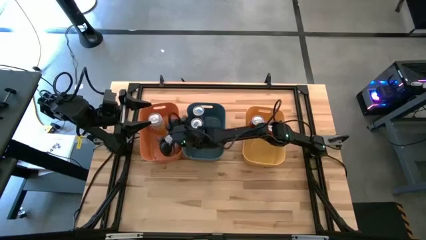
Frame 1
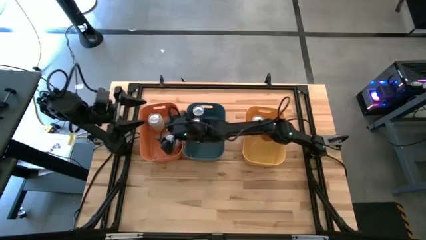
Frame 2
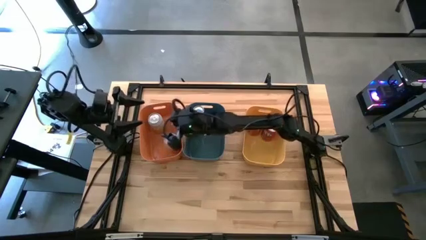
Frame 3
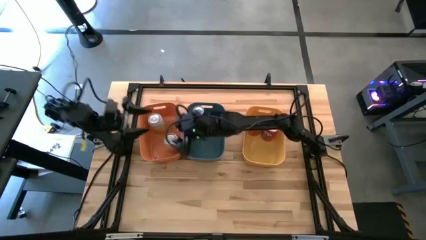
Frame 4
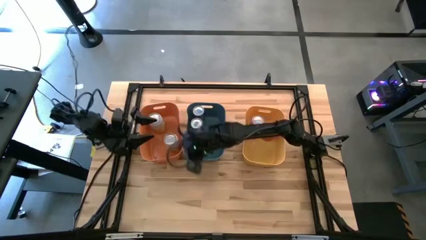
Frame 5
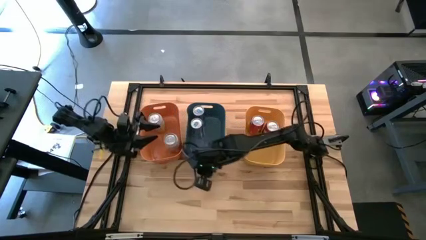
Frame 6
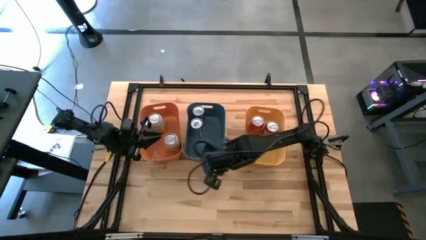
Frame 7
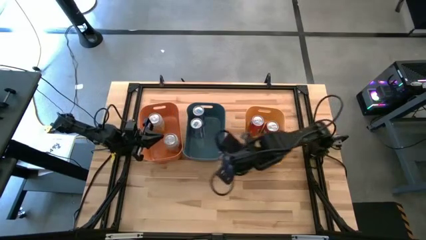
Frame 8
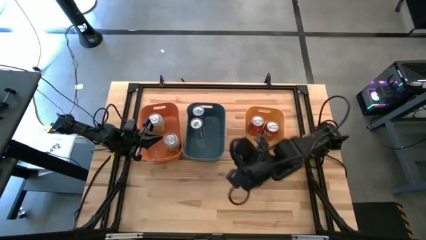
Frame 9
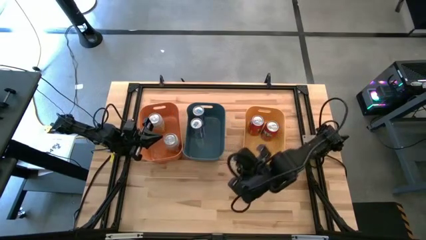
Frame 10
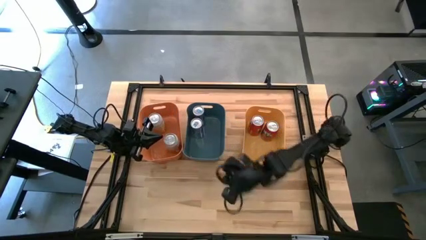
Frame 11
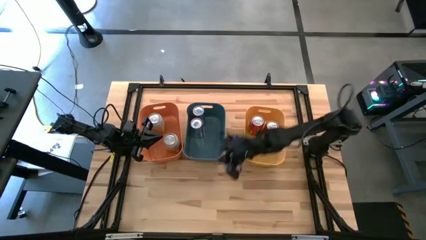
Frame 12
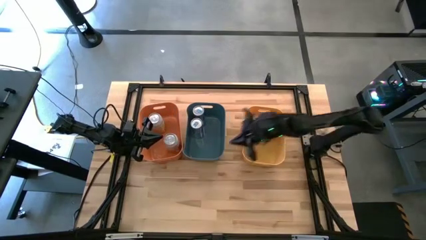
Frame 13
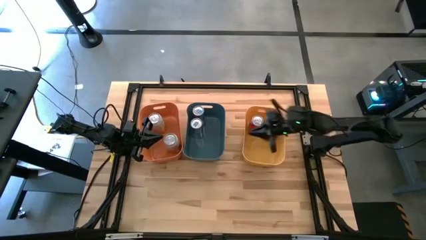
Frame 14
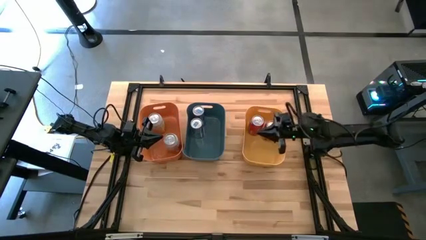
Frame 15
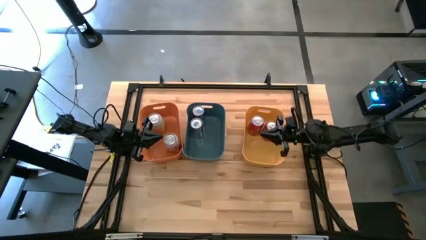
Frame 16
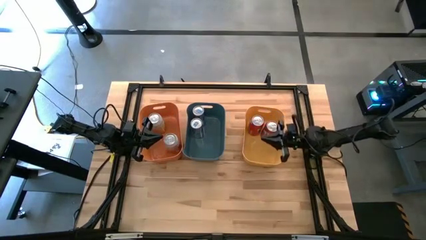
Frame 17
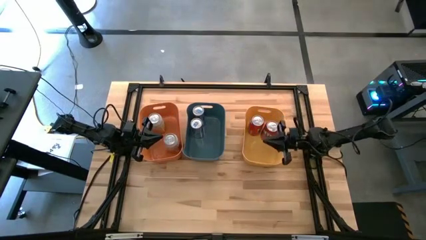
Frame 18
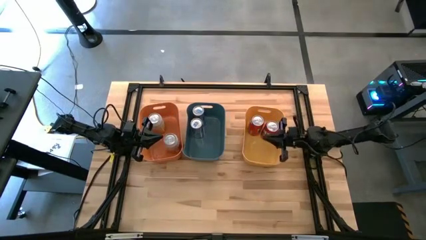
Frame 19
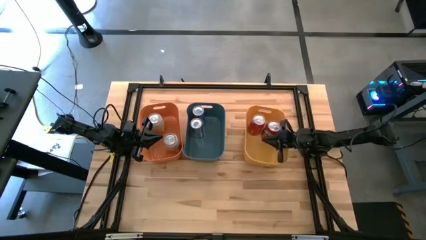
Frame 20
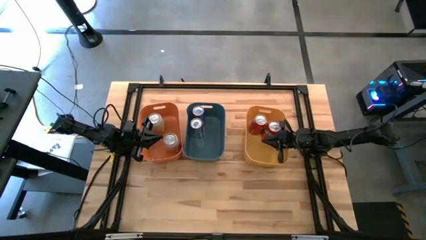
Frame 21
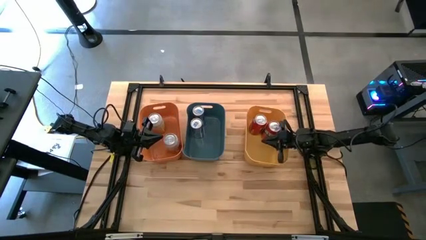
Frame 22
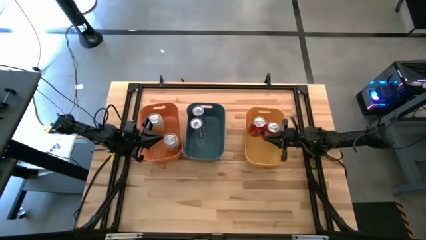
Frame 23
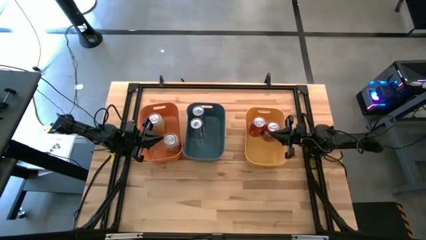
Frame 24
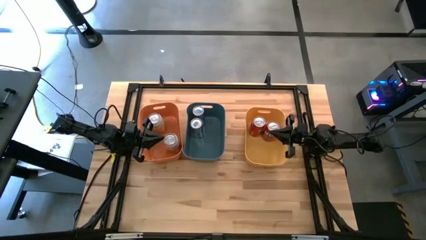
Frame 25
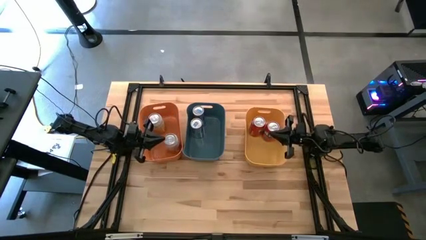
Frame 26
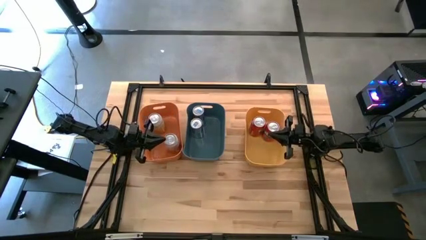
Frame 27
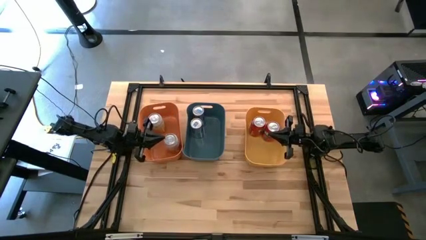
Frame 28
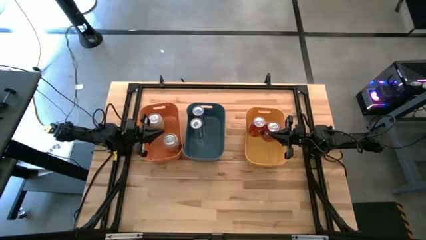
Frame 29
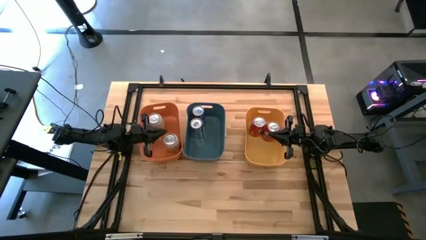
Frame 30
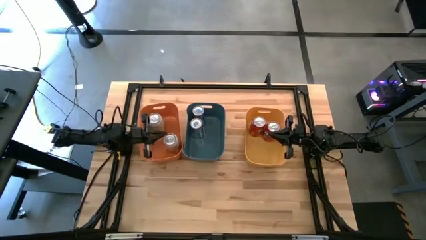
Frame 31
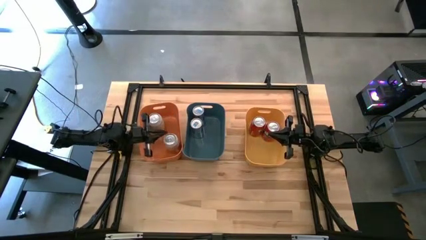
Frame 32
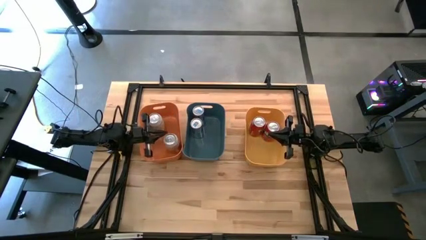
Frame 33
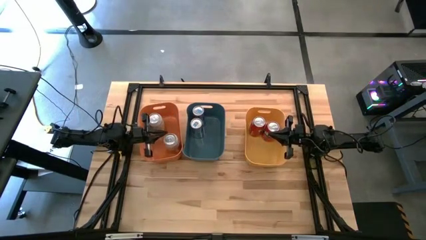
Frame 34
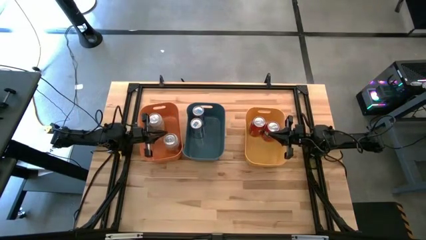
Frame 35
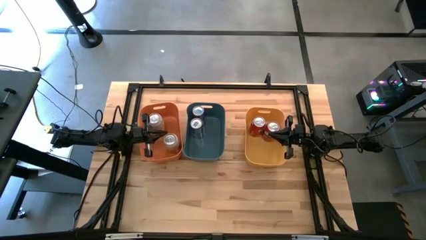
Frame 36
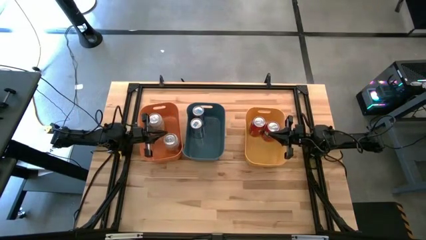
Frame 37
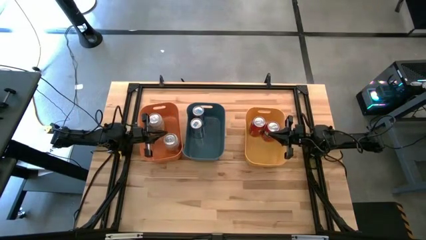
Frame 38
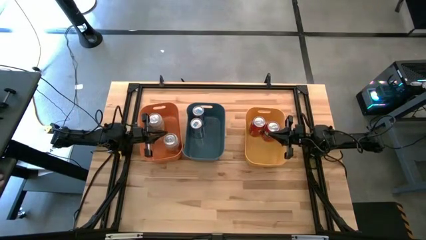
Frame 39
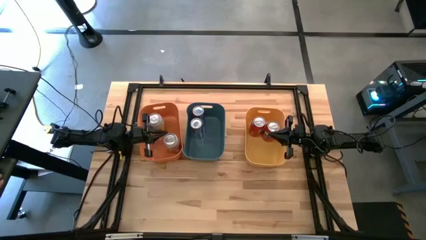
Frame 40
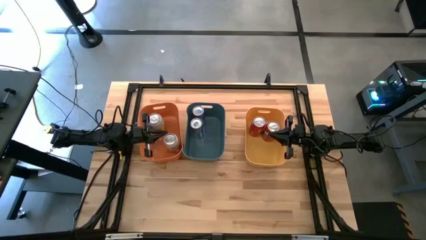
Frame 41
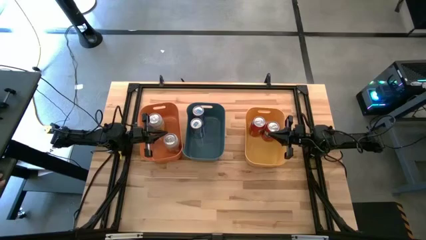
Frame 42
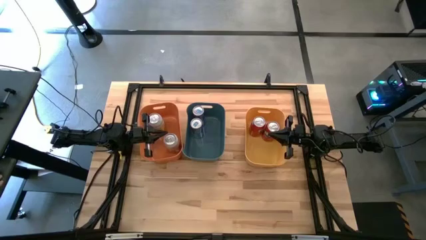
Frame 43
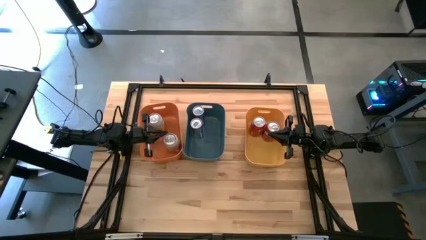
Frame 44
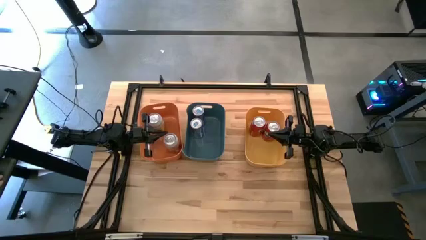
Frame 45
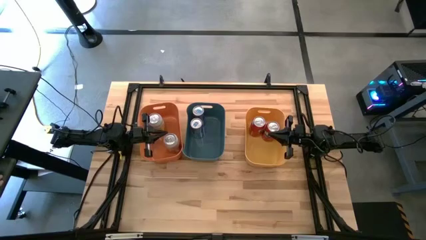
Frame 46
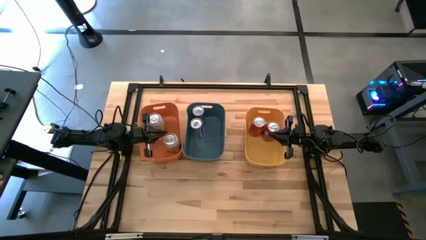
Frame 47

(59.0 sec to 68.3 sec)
Task: Sort soda cans
Return to Home Position

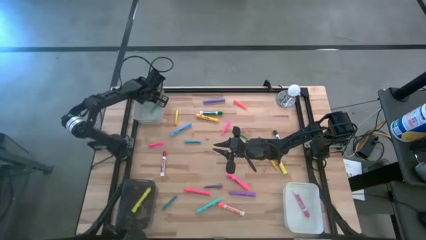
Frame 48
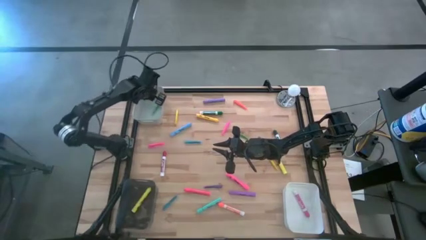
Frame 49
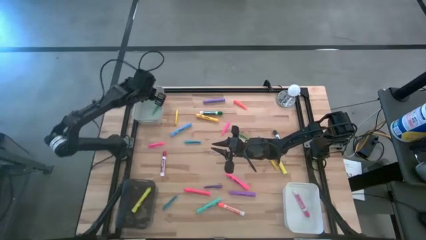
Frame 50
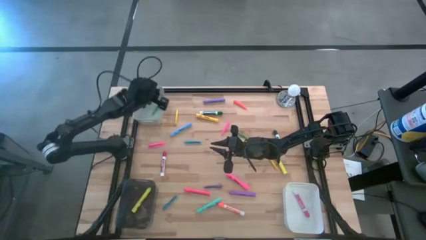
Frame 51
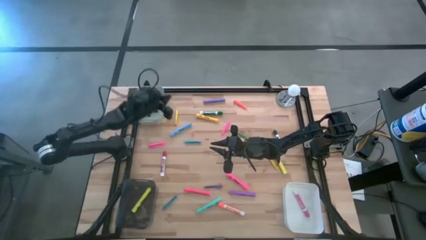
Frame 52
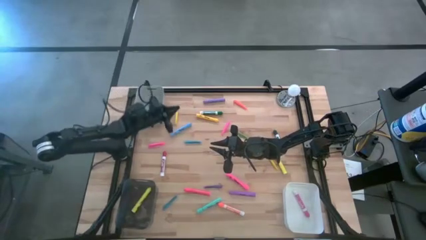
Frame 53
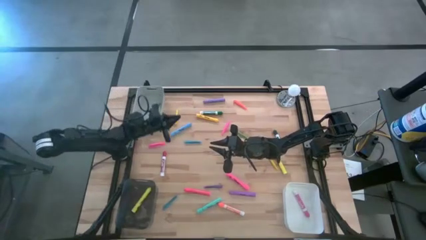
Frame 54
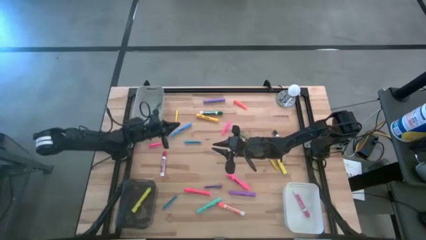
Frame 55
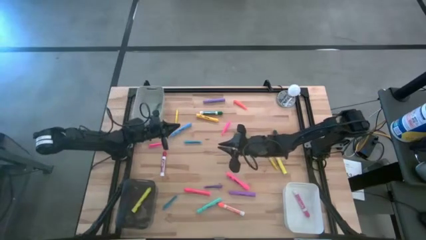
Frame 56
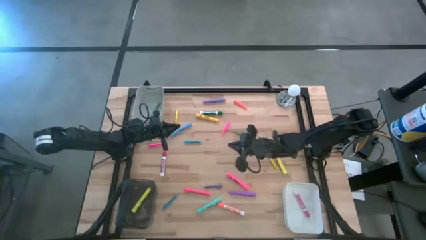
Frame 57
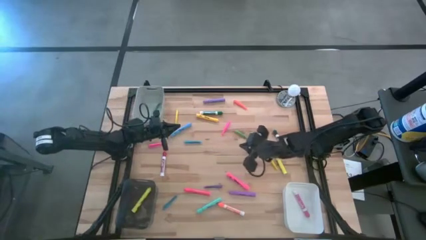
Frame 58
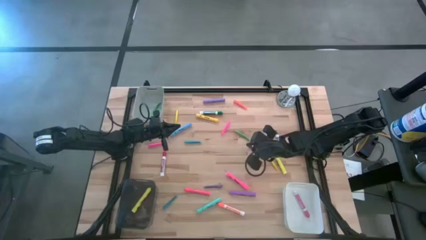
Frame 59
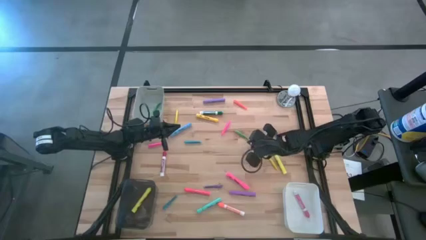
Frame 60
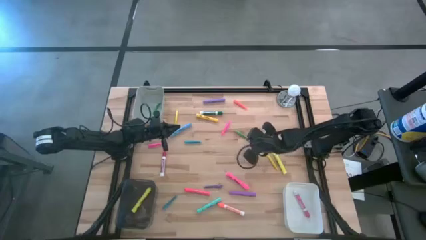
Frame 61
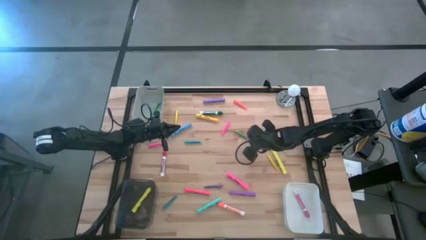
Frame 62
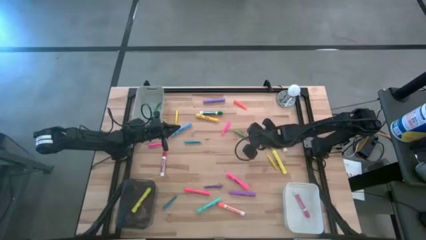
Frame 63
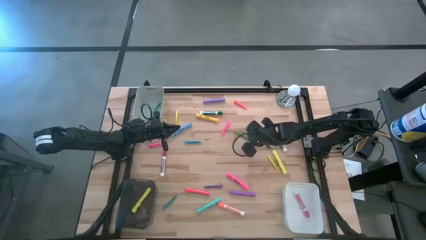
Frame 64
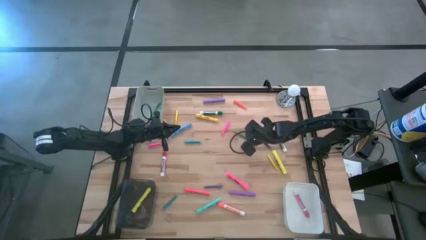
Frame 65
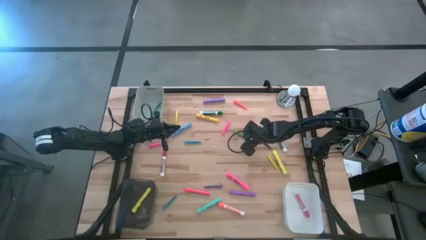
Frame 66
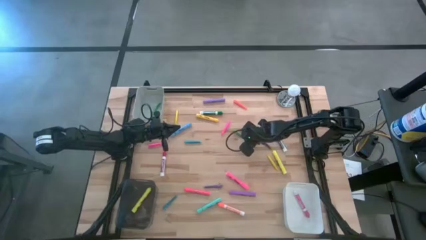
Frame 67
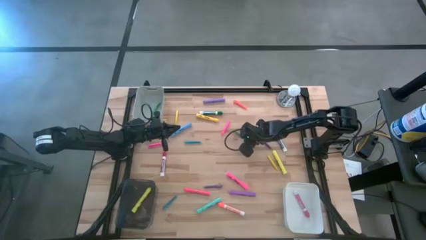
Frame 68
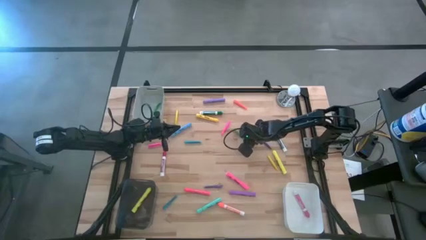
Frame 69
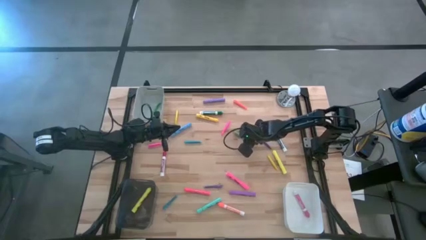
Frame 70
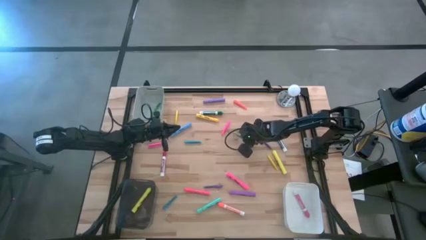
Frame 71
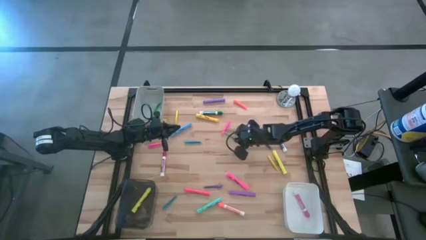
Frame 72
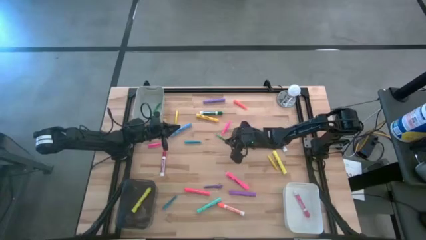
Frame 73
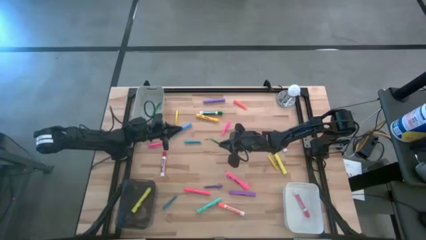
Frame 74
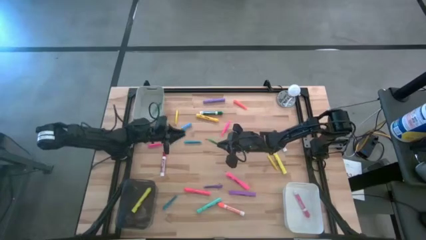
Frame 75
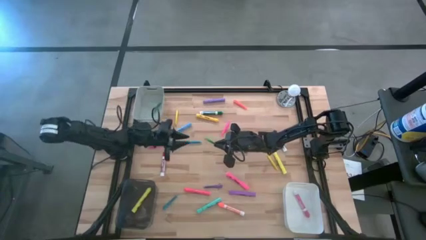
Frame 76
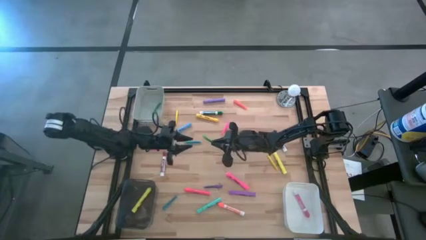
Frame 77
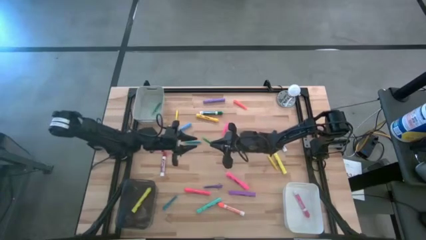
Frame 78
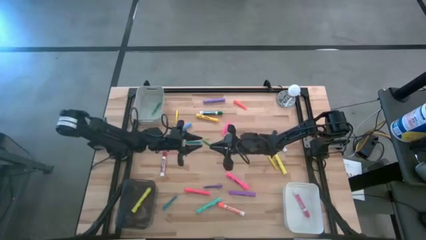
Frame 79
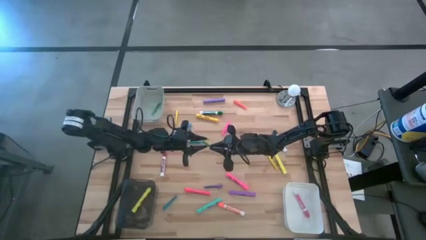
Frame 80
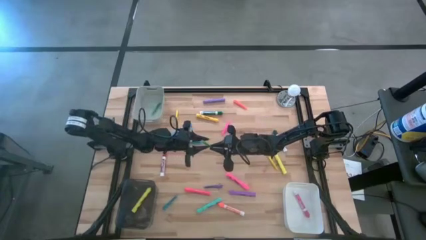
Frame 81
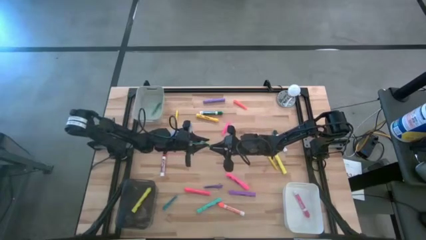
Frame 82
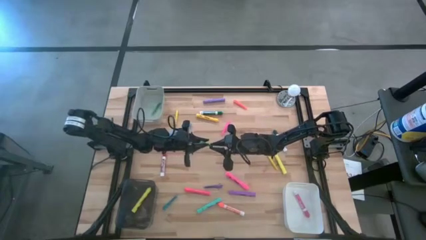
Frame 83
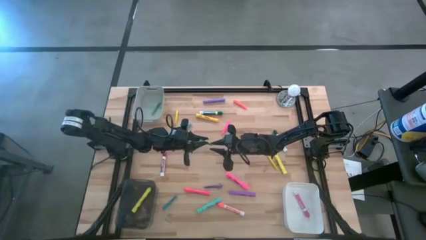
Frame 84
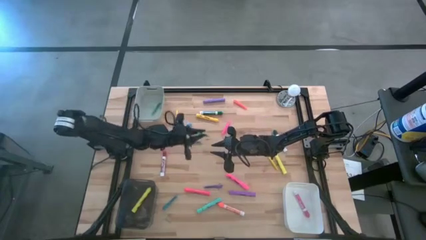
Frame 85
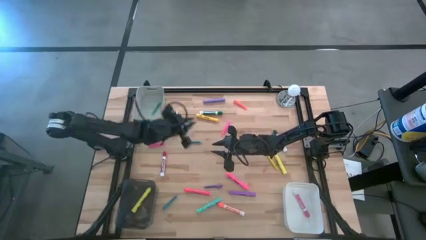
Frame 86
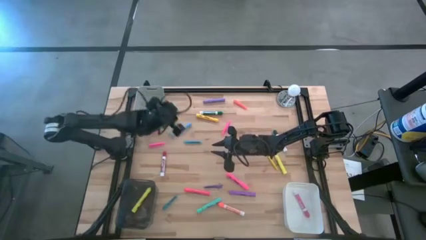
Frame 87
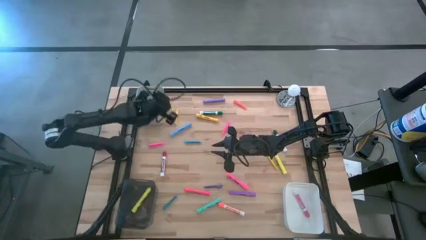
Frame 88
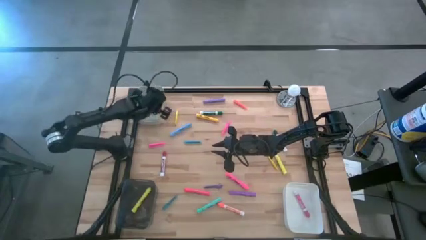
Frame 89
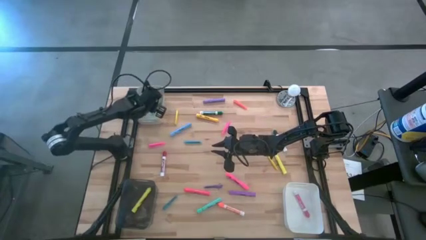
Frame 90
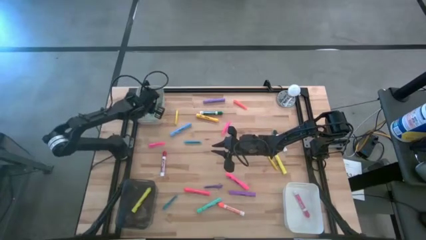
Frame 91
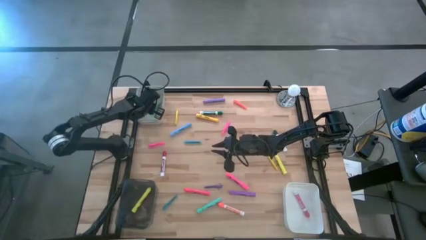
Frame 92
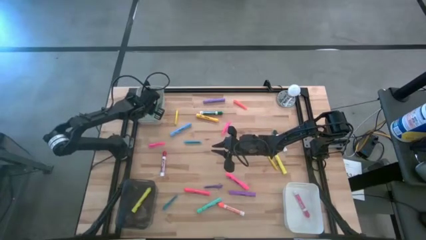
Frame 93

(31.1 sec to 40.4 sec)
Task: Pick & Place Markers
Put the green pen into the gray bin
